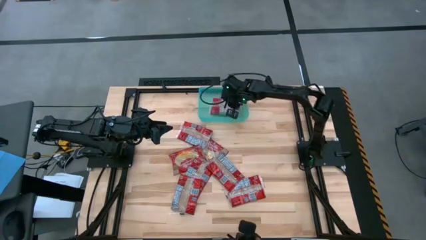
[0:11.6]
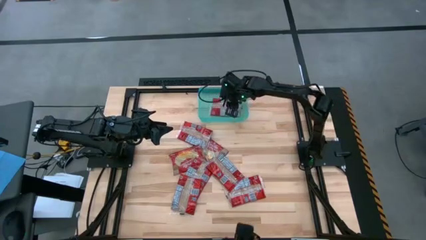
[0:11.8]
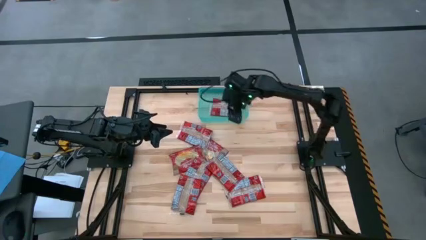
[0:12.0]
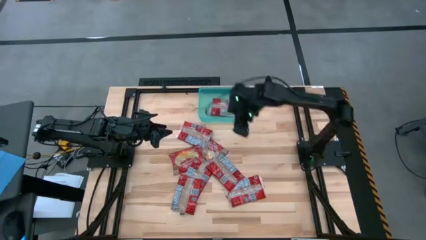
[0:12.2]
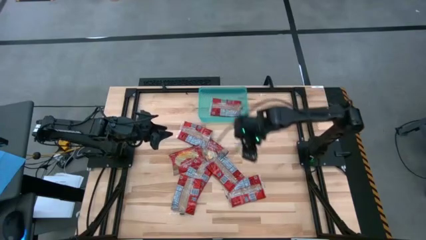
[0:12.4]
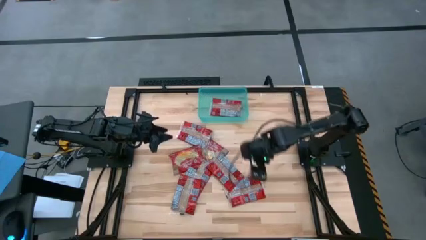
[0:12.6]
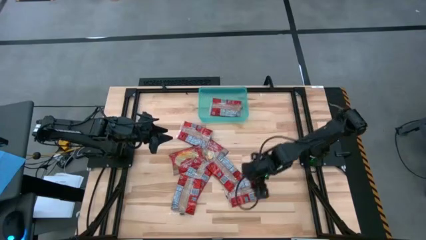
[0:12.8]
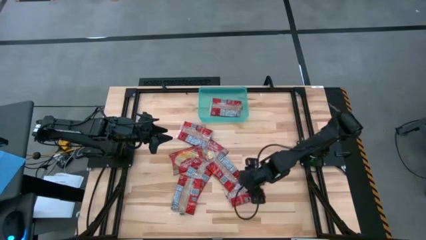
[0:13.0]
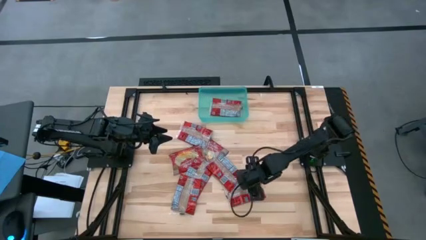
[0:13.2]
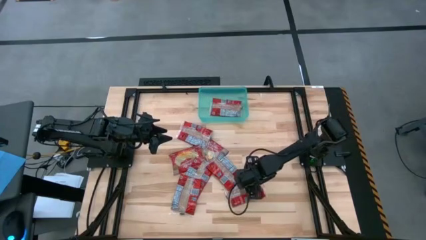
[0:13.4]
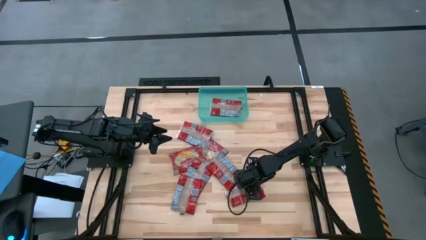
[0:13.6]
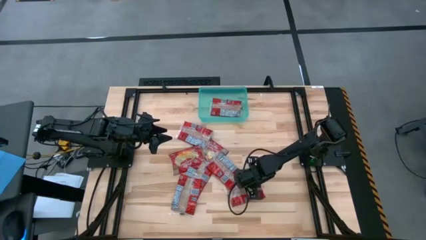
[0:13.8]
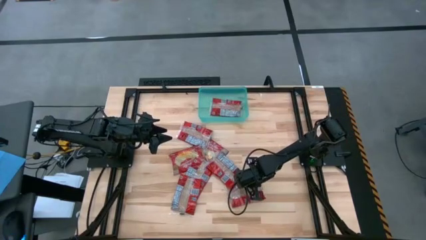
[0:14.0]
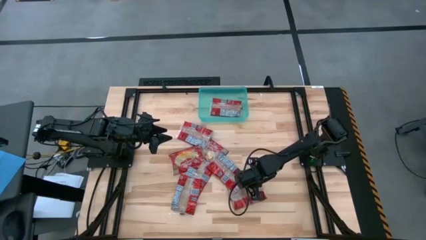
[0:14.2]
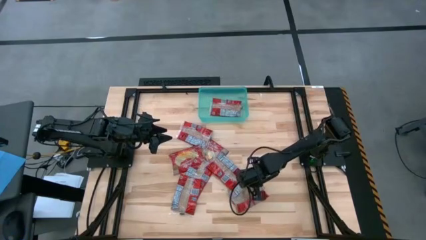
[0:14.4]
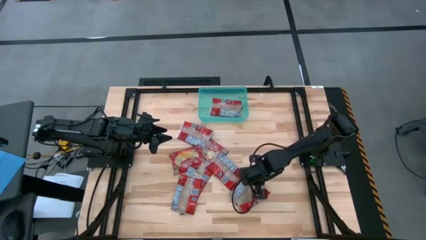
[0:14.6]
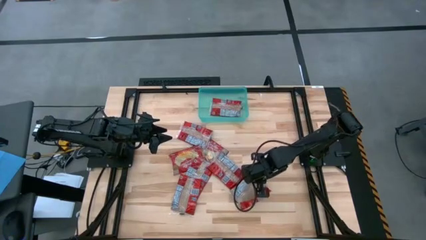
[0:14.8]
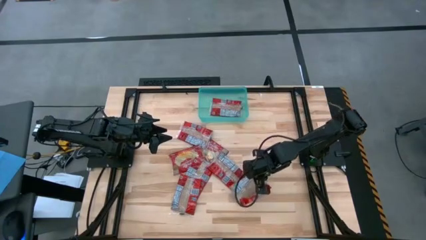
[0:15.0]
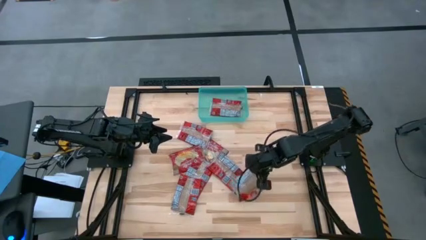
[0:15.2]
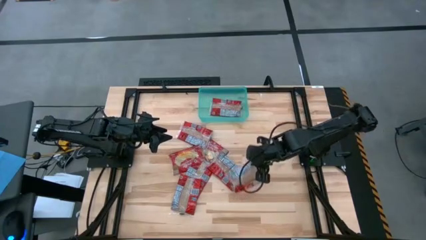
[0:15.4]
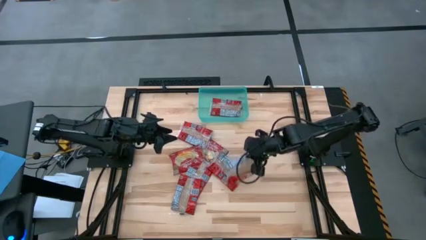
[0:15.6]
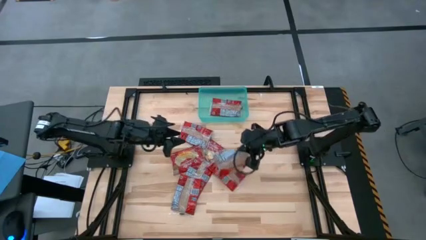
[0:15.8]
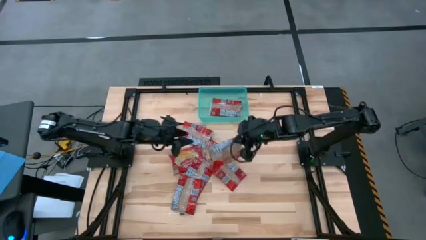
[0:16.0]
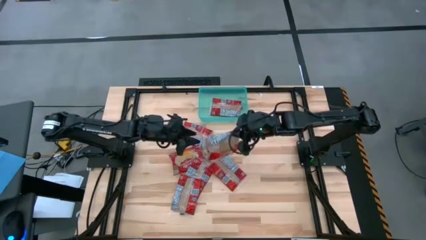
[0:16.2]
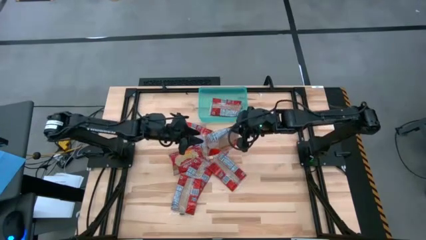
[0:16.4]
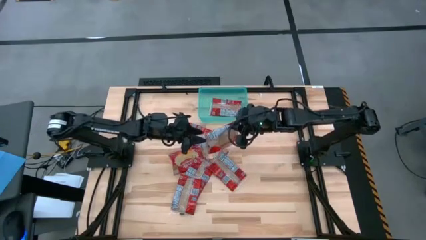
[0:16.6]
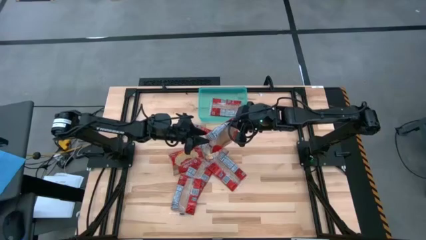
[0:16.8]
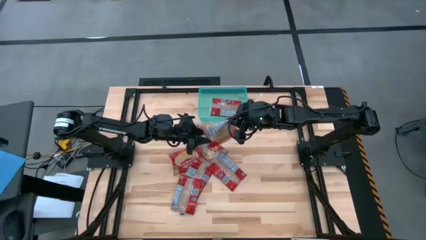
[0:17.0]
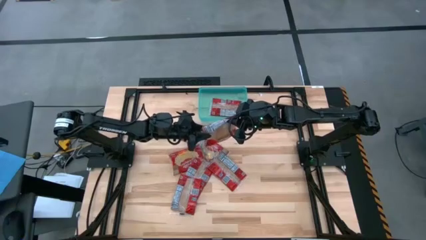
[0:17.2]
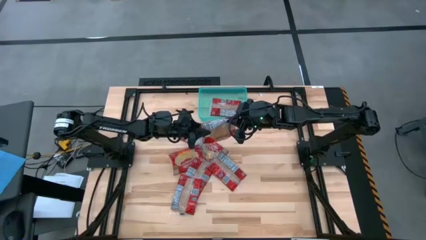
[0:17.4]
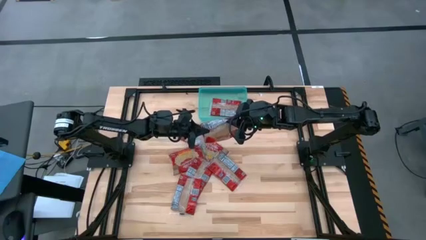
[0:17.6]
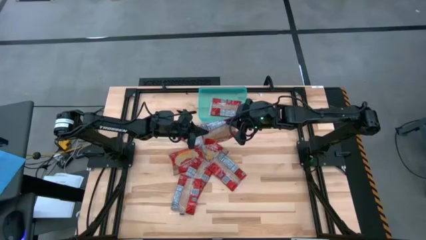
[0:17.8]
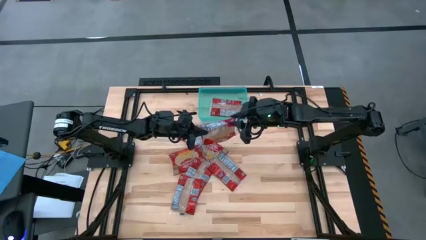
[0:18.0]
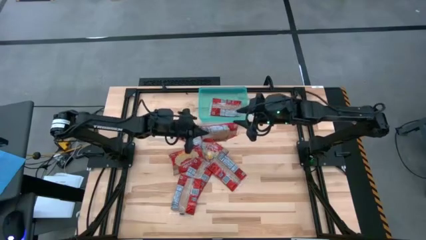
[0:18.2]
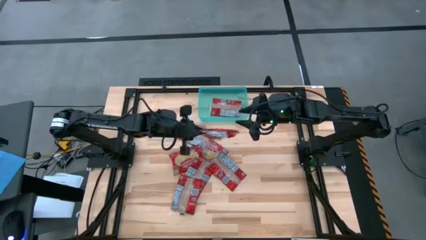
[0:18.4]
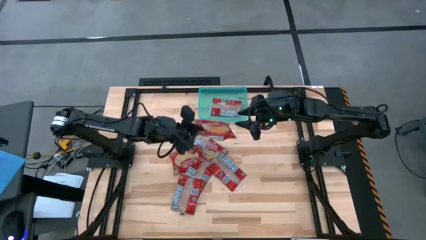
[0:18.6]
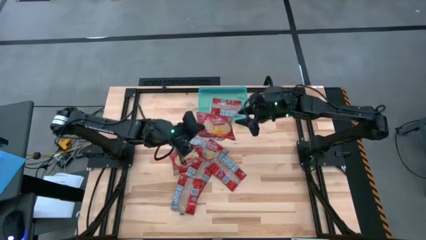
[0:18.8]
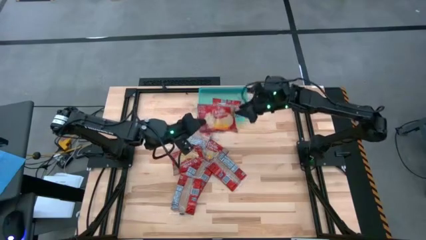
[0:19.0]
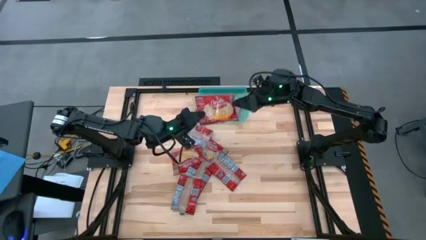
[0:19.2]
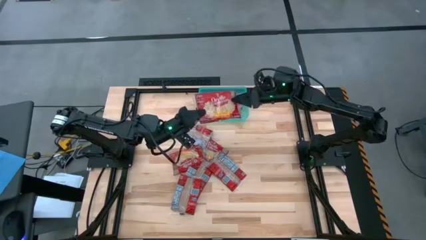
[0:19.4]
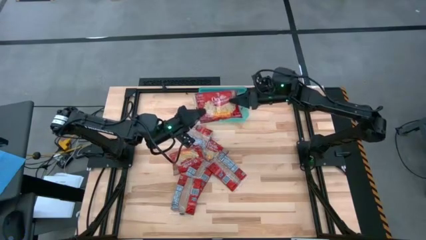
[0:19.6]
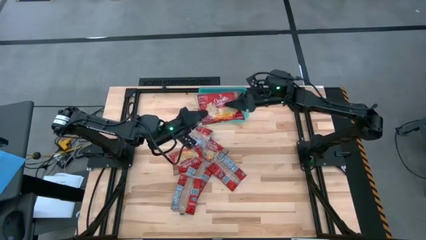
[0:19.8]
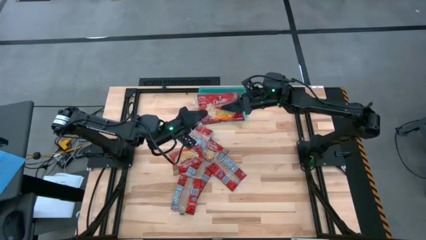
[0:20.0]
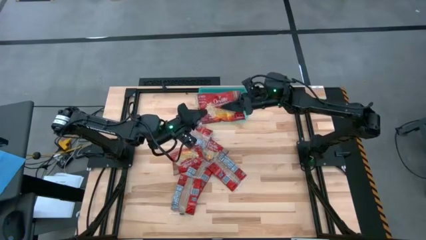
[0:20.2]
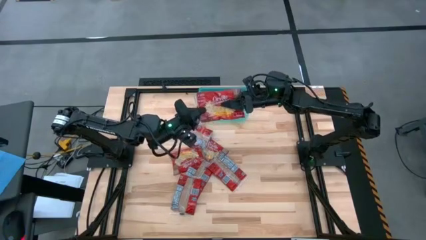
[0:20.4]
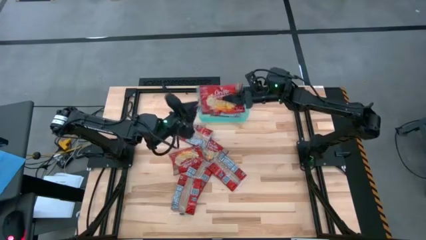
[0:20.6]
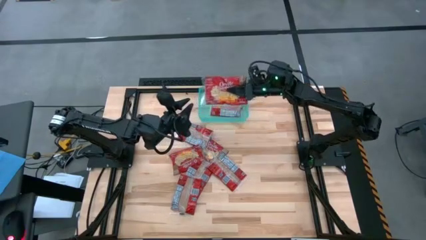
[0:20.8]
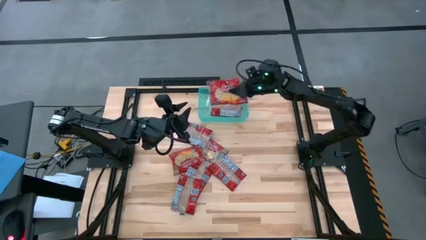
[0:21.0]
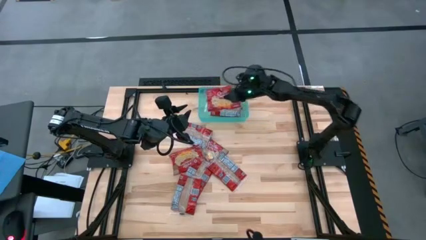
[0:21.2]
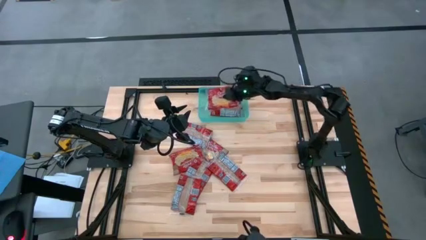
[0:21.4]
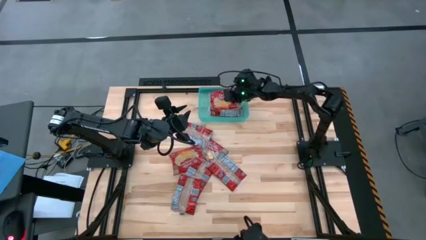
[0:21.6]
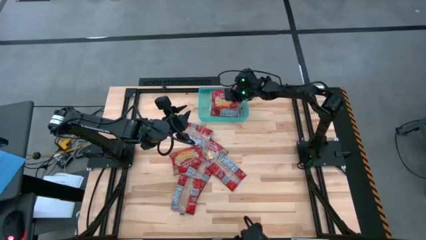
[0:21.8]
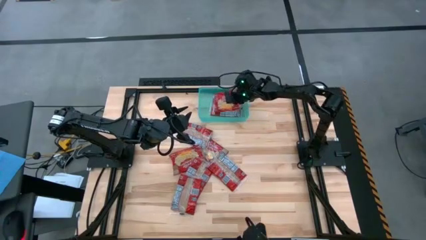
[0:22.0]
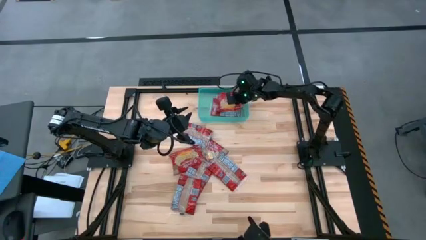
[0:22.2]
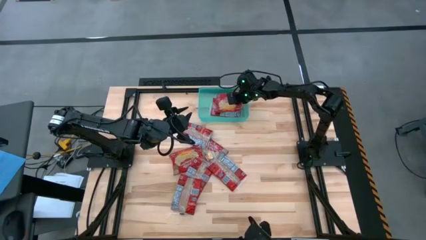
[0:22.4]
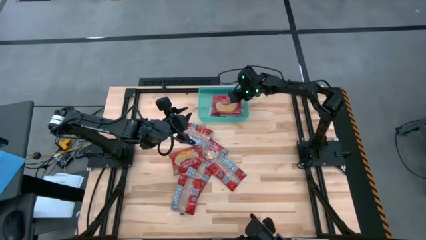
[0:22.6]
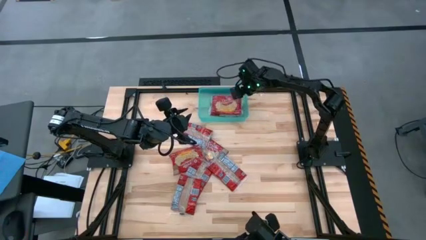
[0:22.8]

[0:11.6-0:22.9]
Task: Sort popcorn bags into baskets
Put the red popcorn bag into the green bin

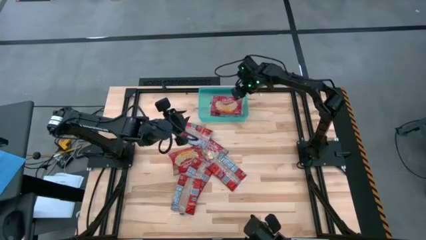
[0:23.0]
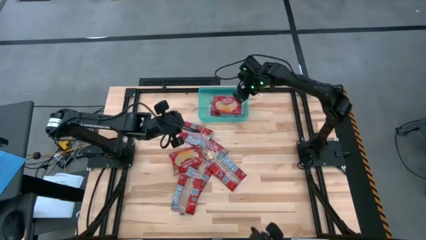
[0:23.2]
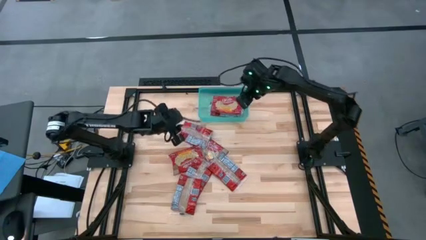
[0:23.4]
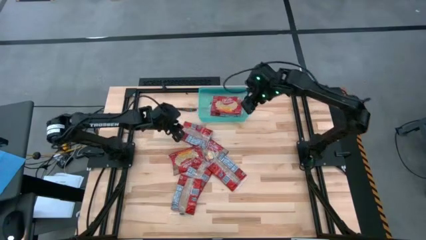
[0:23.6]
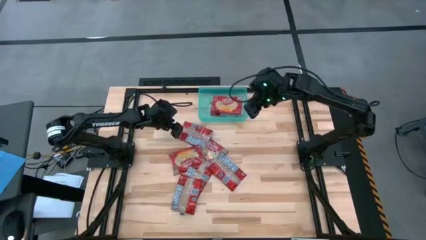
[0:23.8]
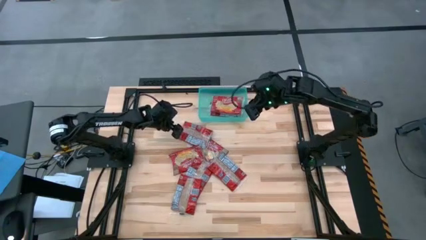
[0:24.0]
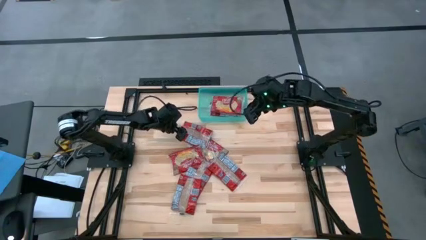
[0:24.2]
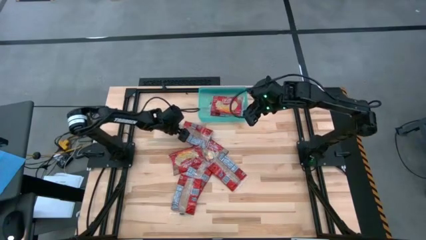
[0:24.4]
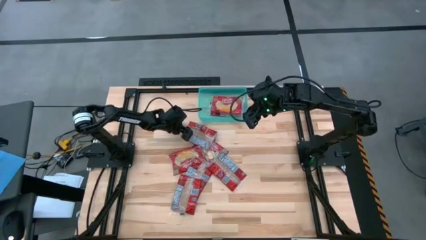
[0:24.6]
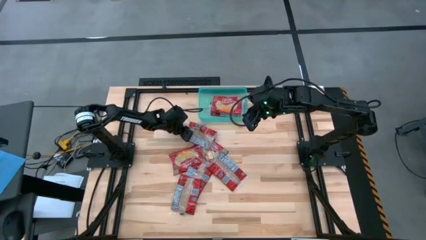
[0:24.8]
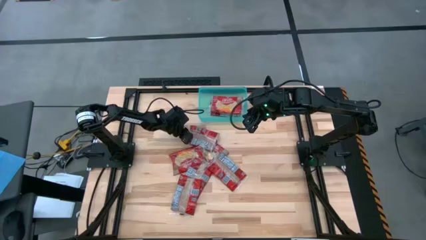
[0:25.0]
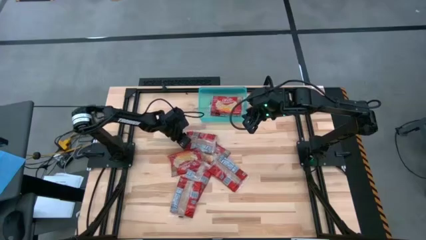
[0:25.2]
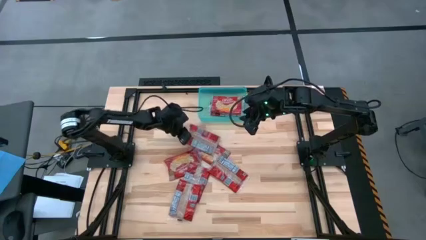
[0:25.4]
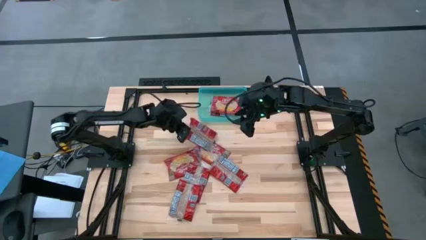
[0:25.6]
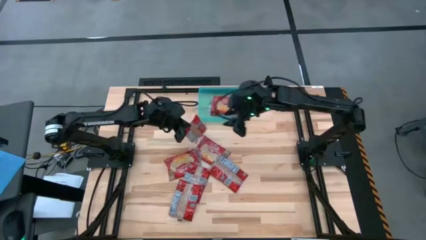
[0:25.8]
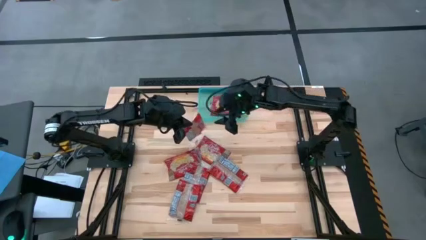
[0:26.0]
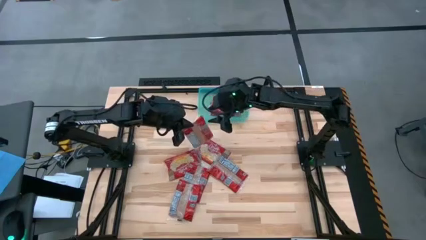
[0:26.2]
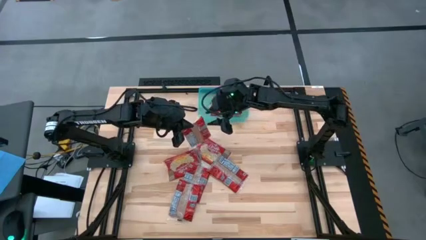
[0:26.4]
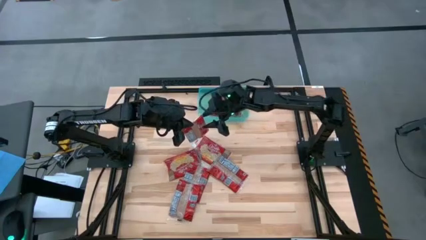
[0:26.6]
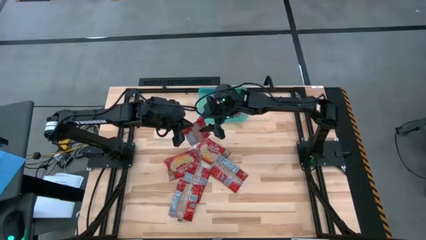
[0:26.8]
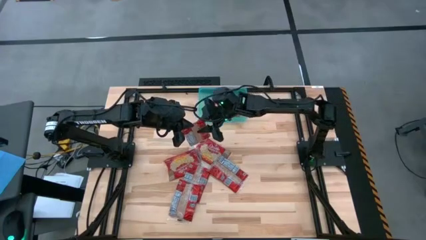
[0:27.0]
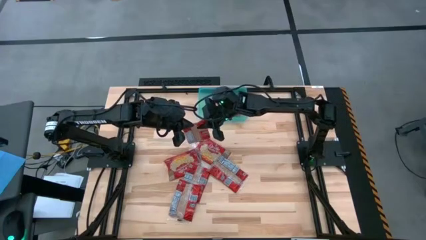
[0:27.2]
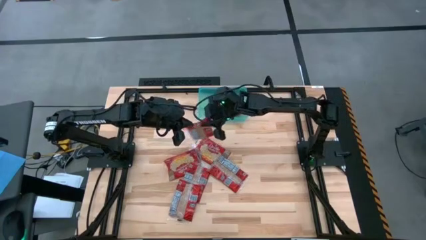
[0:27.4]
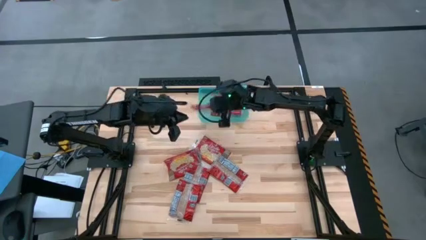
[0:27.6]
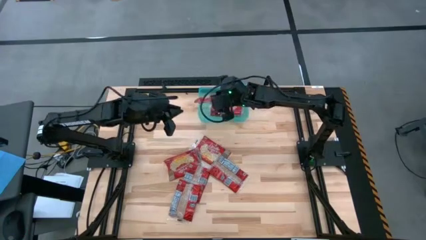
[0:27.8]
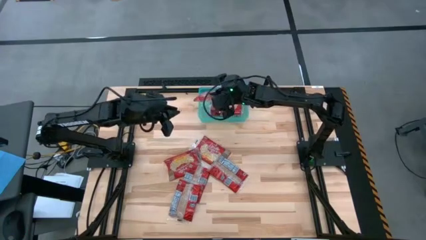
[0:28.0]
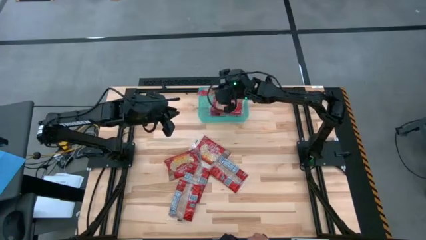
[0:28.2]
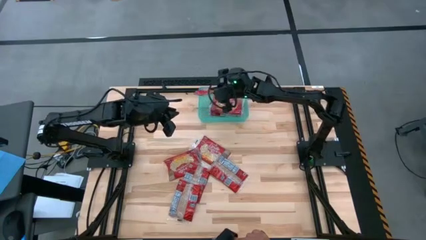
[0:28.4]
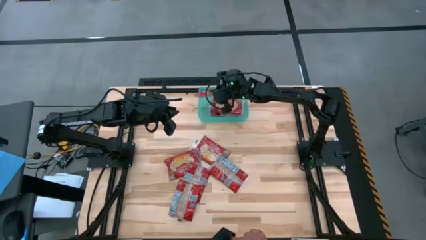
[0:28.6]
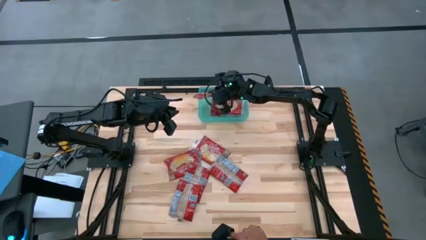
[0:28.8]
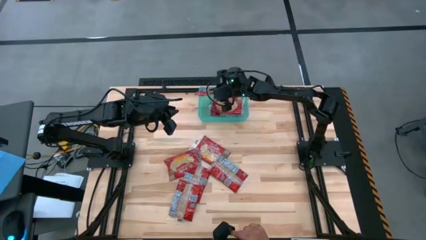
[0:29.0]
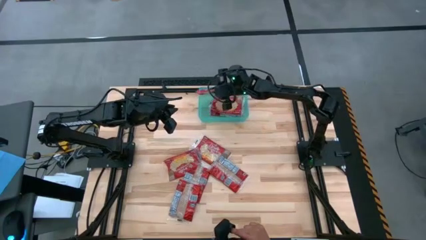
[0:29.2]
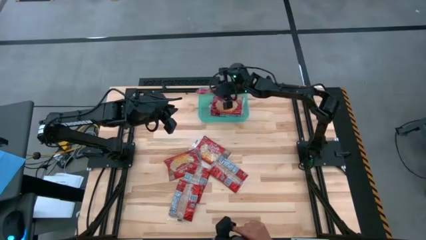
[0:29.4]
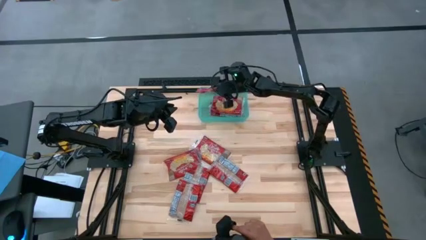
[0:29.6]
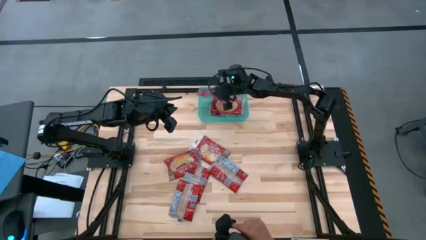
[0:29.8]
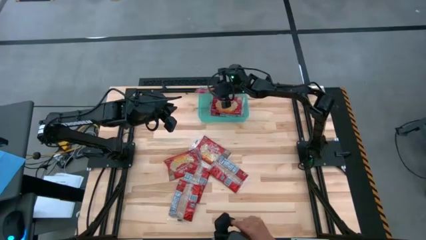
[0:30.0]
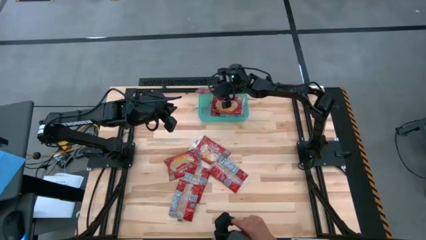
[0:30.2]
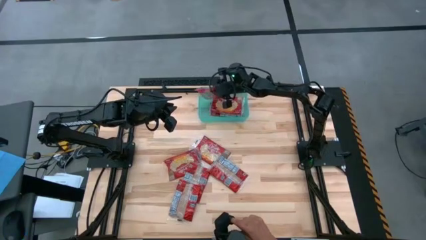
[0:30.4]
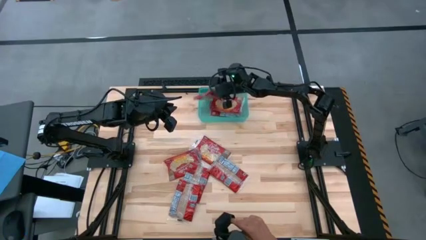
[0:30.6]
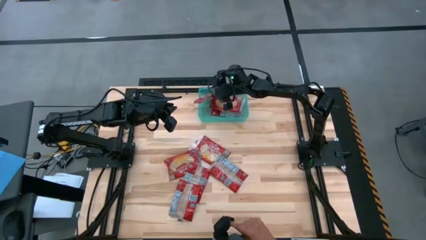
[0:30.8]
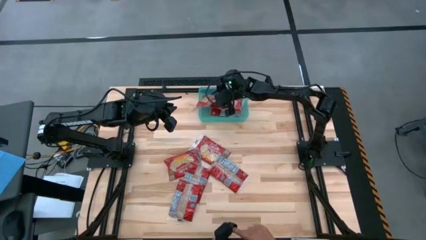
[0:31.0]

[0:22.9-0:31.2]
Put the red popcorn bag into the green bin
